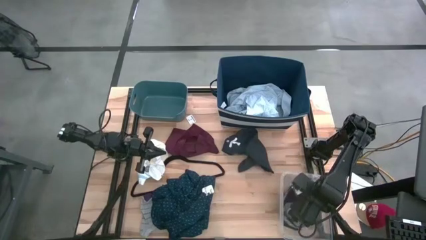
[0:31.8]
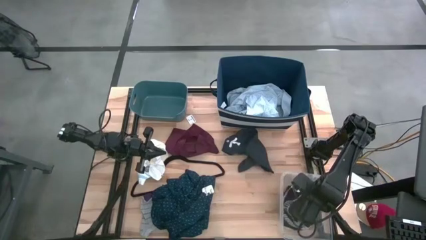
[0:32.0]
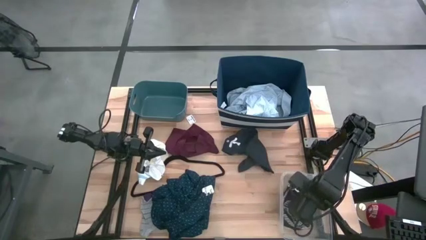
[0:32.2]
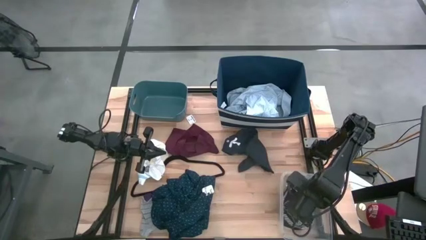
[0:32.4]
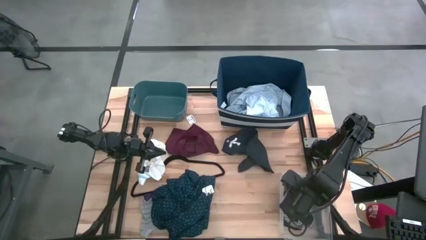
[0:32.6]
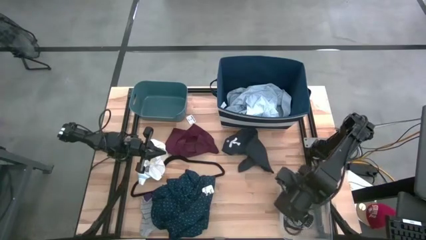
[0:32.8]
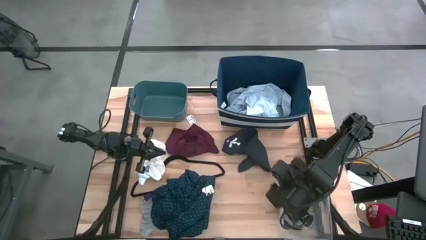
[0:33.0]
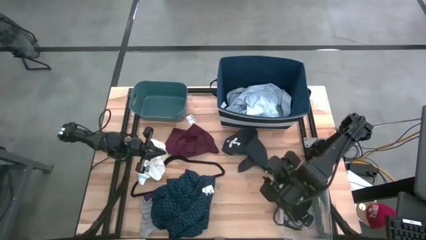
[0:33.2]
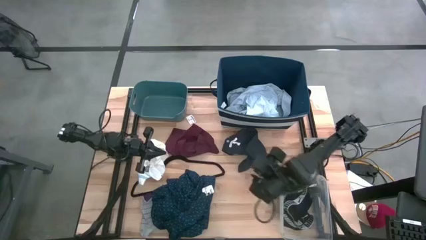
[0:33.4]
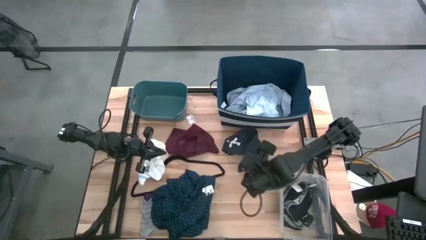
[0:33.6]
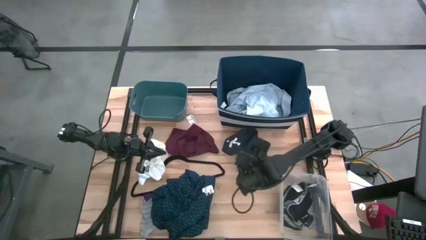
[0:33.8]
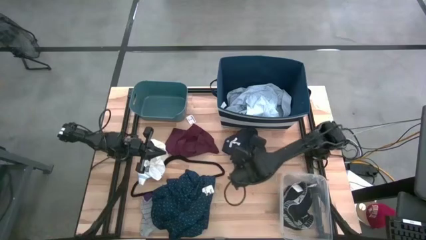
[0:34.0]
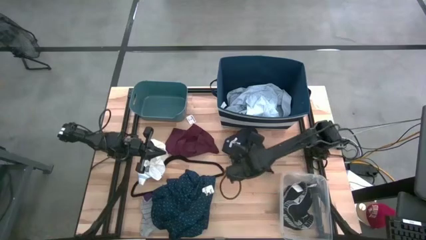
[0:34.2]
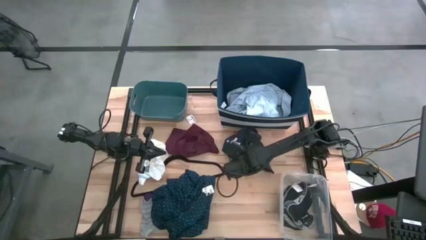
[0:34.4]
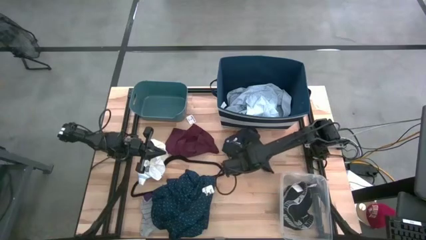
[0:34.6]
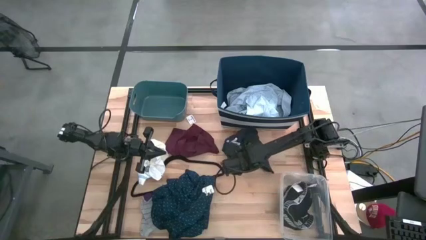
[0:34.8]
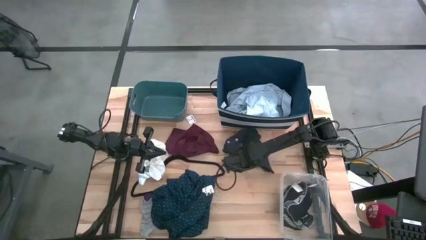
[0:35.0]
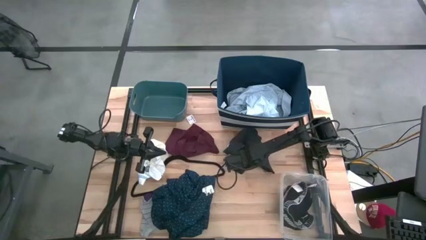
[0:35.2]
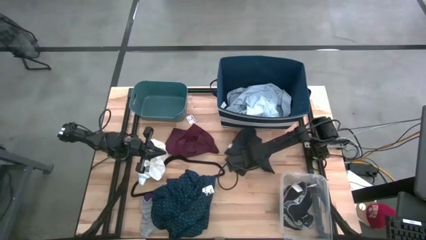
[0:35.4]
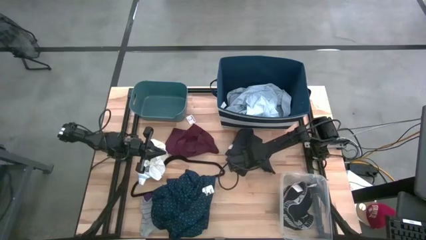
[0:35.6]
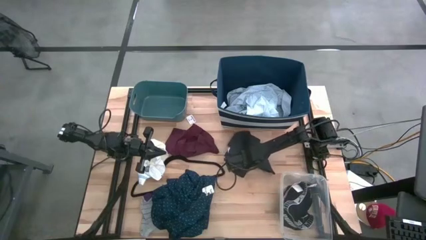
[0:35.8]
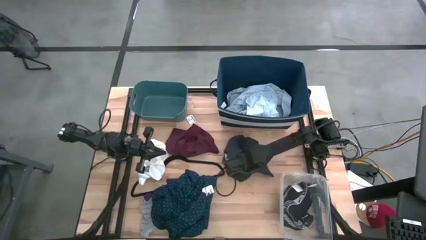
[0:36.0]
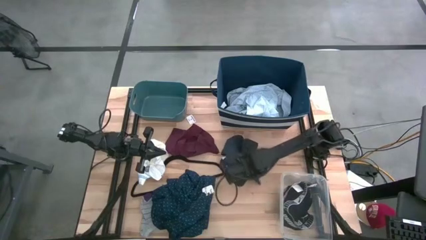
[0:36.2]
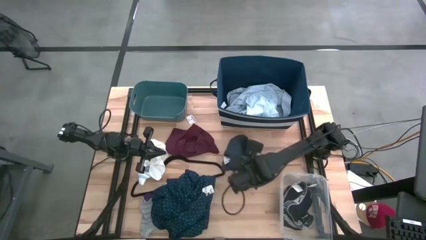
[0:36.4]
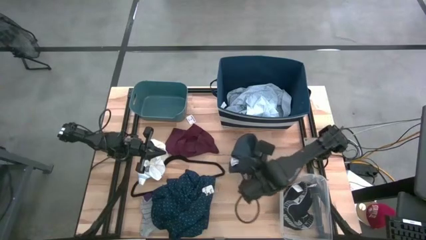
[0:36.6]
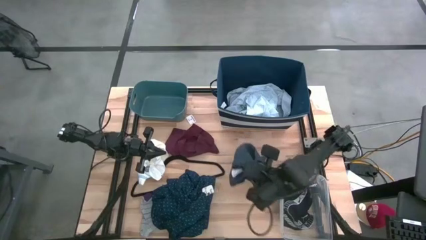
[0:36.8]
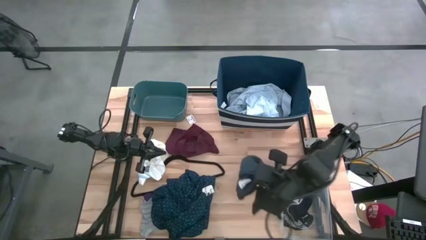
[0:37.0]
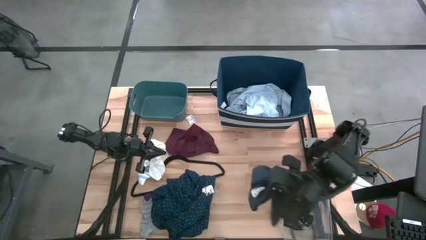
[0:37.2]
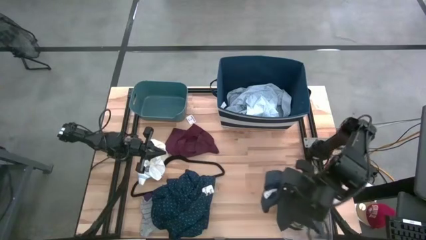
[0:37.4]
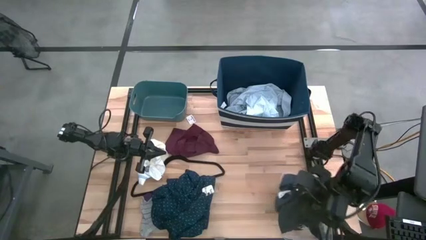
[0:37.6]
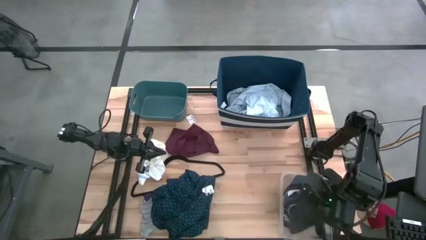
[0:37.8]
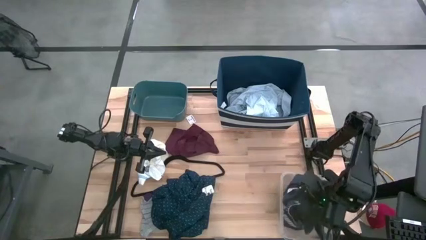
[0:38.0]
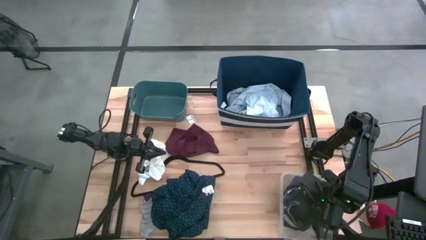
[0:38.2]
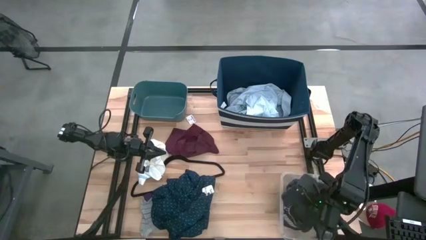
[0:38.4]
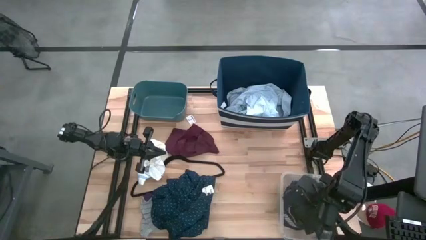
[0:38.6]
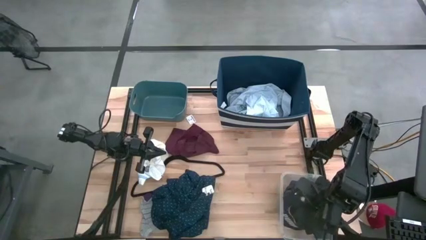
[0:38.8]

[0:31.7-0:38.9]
Task: Pick & Place Cloths
Put the black boxer shorts into the transparent bin

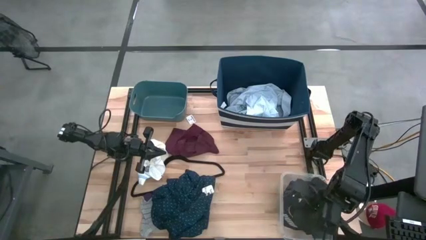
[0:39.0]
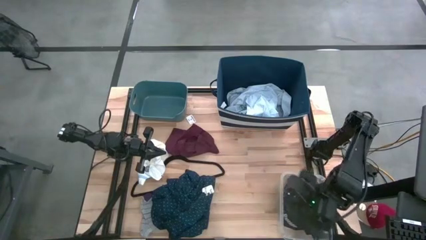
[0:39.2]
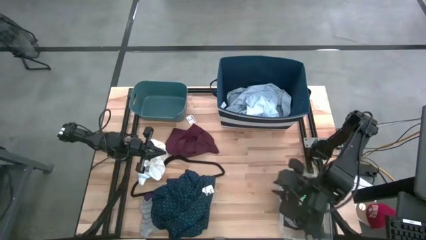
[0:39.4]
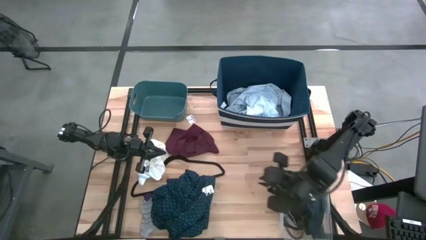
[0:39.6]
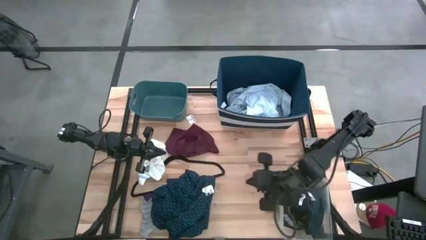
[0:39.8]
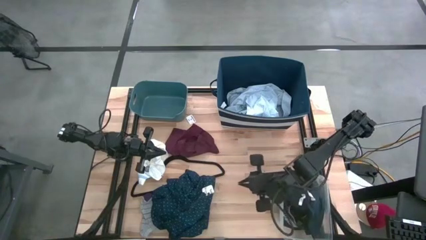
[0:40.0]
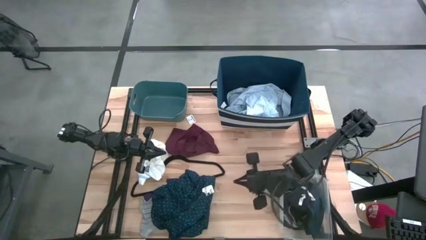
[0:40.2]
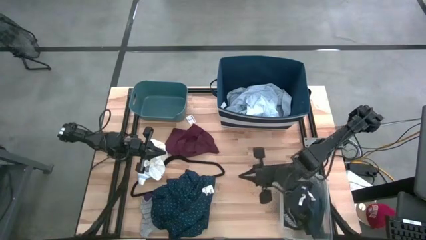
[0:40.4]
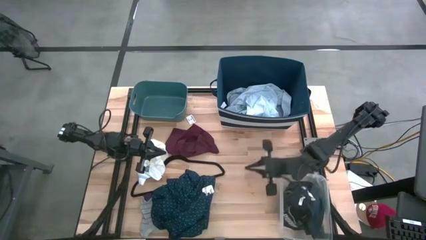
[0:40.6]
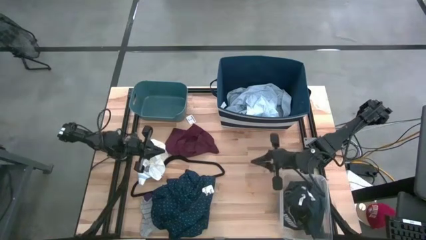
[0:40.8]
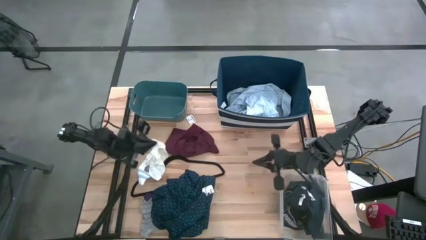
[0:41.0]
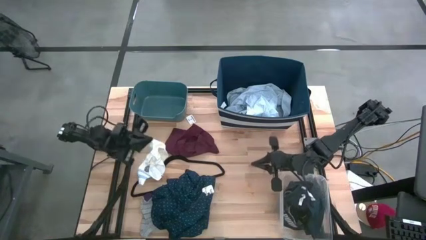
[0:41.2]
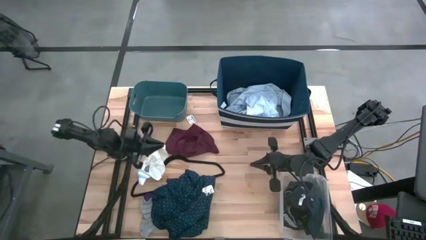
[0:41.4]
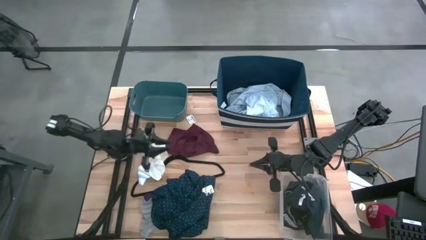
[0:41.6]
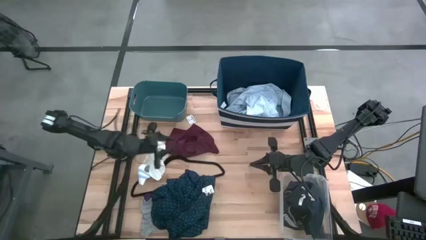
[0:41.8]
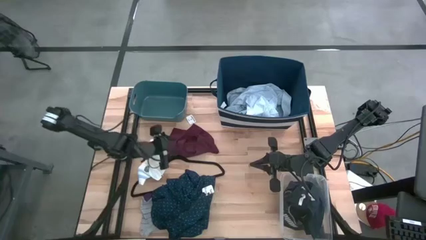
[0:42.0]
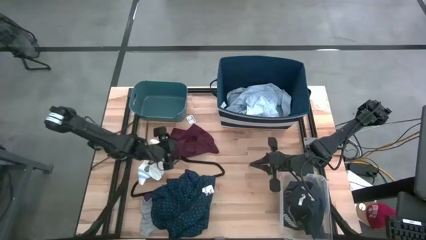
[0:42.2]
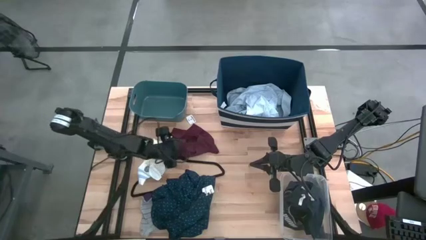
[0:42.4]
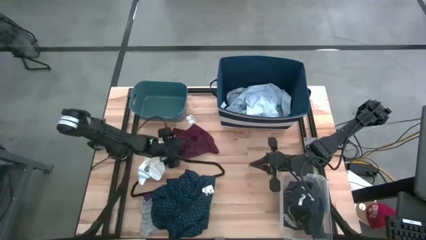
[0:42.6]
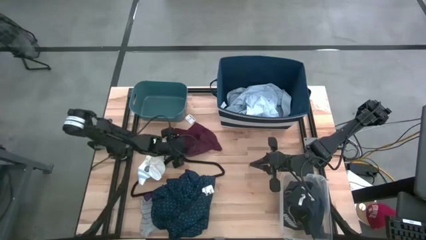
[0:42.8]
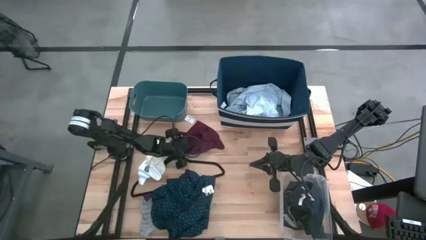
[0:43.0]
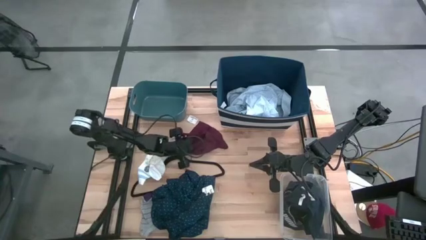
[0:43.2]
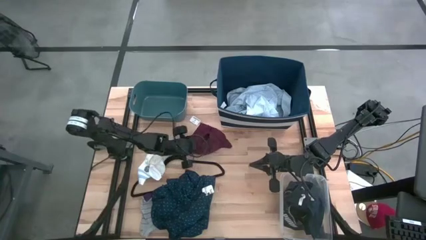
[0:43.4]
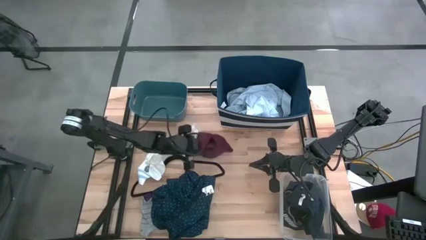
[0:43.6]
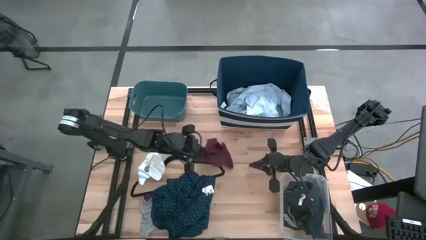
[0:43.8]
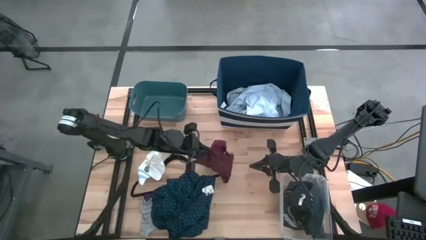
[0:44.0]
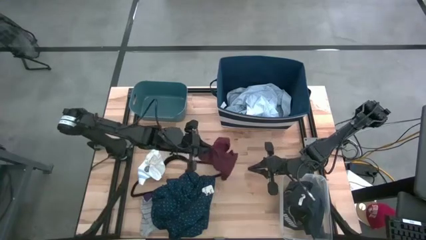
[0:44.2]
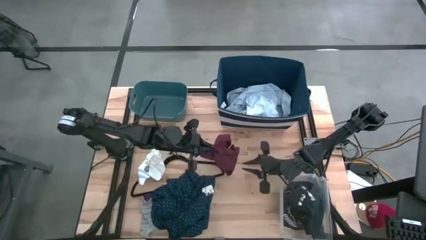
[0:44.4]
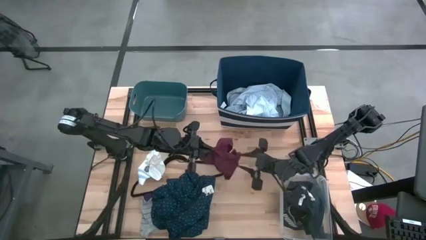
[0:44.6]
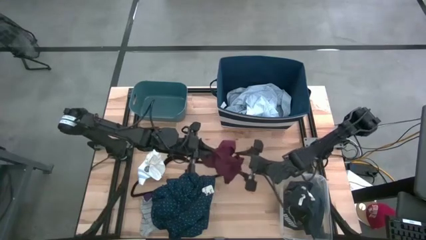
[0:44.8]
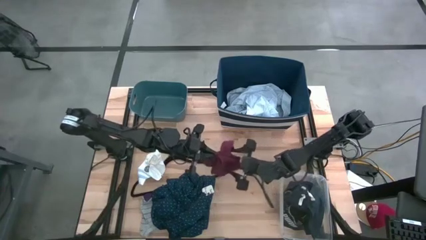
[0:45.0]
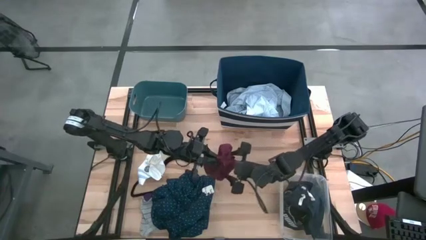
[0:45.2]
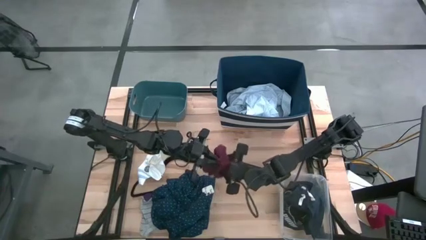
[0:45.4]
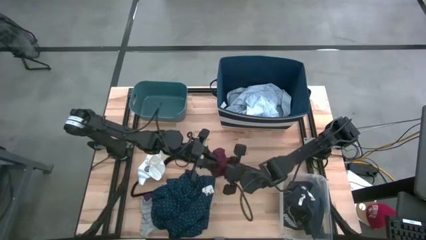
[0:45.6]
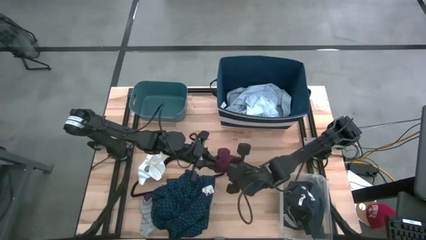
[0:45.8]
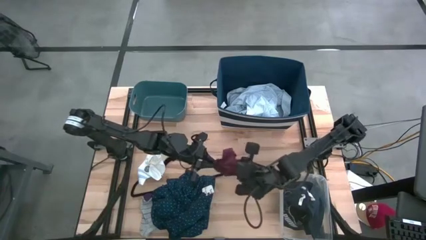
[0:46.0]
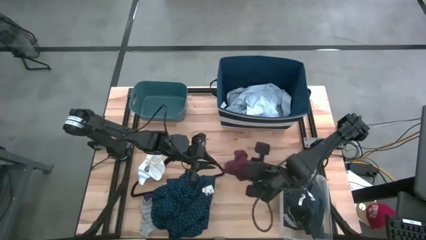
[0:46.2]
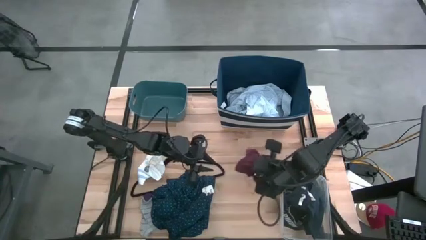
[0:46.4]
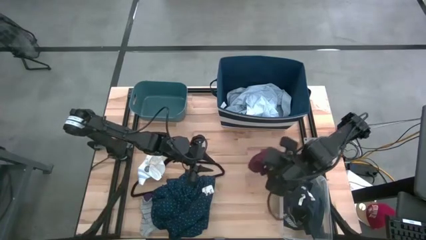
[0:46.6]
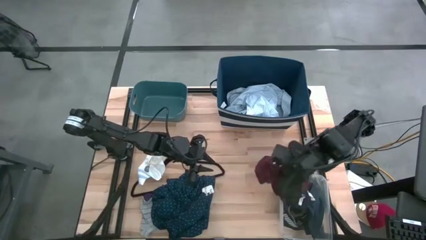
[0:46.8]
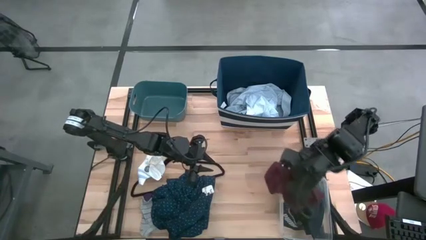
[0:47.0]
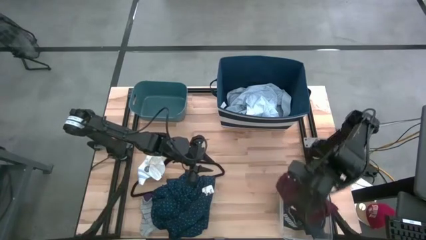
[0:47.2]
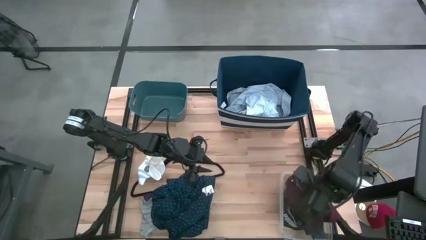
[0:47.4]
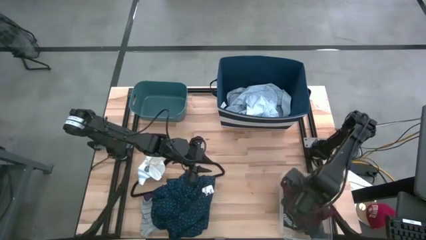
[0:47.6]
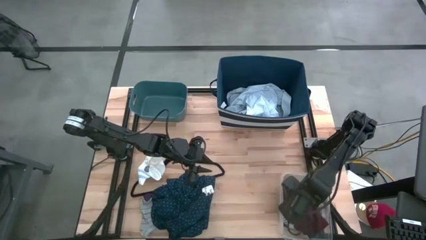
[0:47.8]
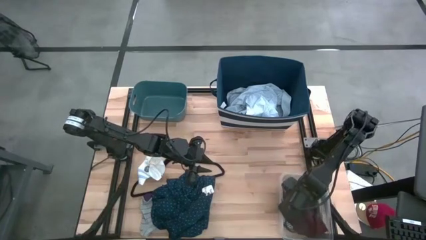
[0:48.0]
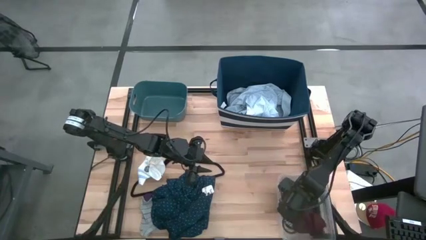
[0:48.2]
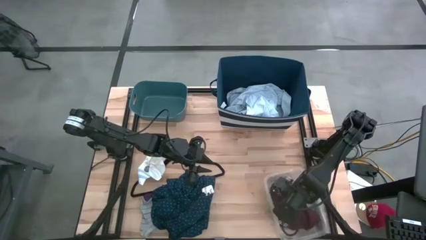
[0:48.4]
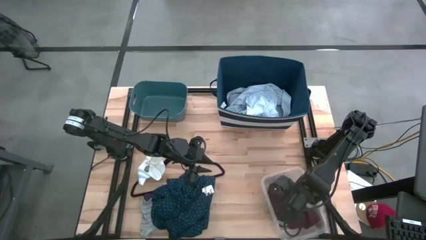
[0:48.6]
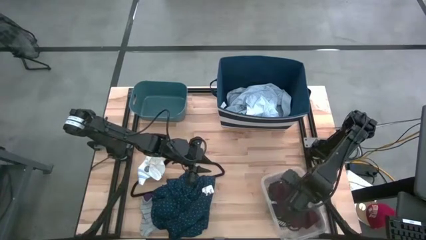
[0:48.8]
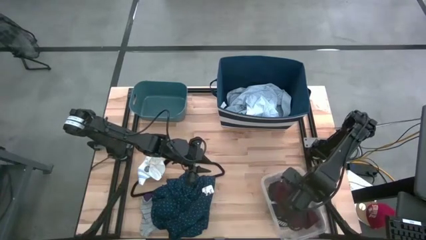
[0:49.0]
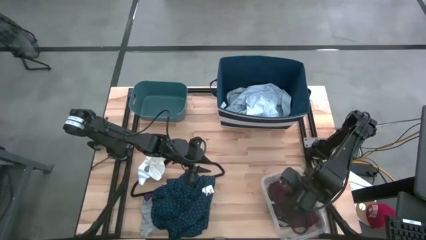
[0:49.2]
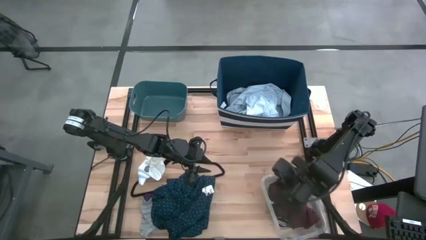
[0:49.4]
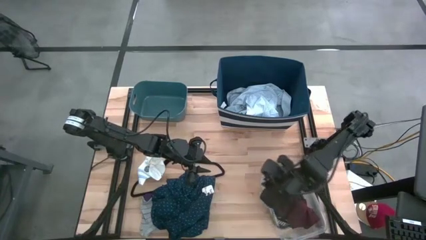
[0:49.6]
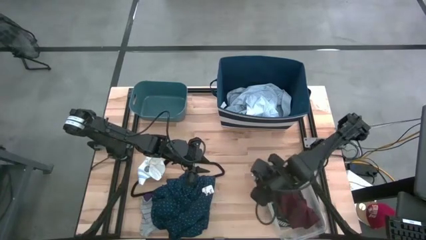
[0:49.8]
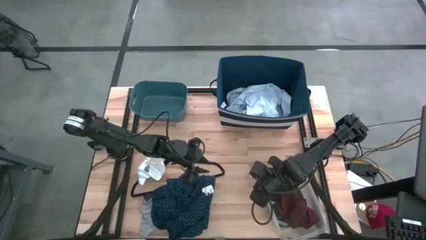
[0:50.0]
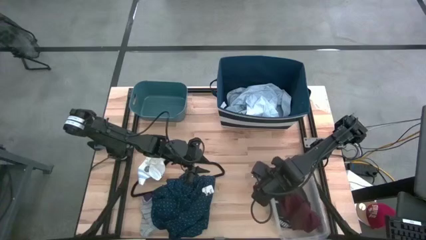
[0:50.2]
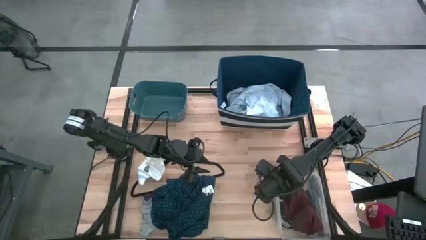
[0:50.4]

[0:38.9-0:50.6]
Put the red underwear into the transparent bin
